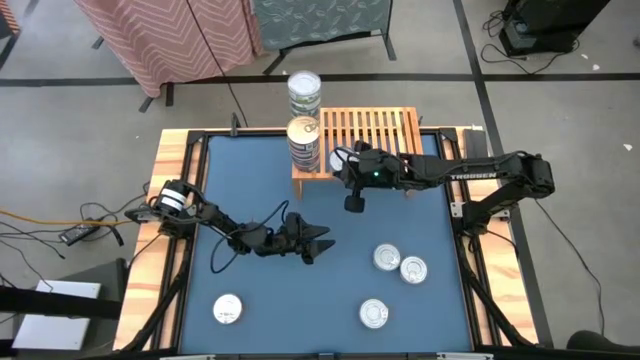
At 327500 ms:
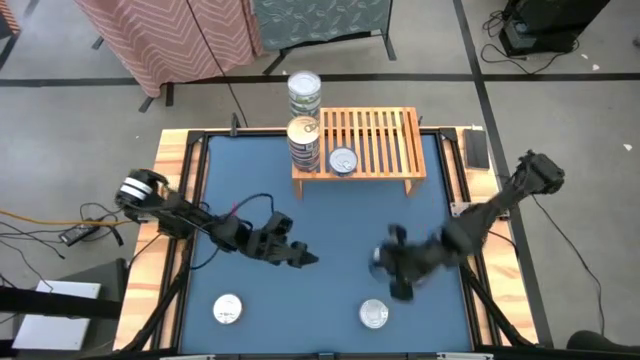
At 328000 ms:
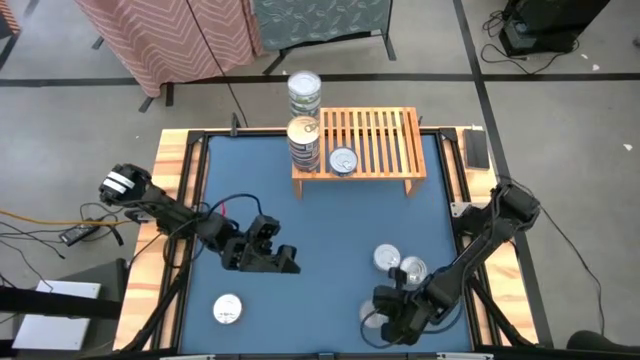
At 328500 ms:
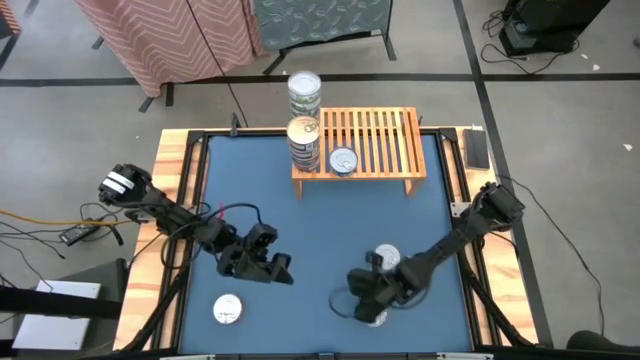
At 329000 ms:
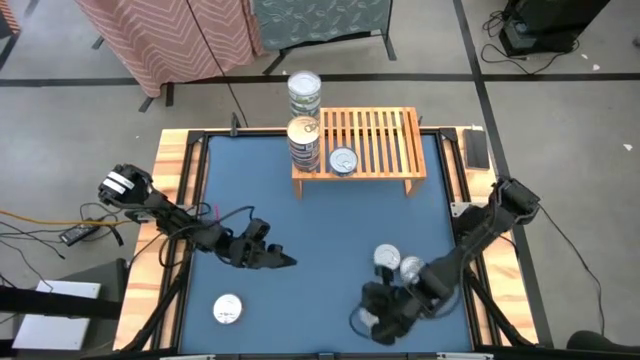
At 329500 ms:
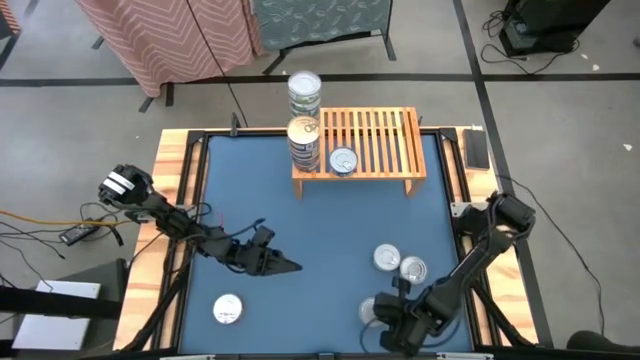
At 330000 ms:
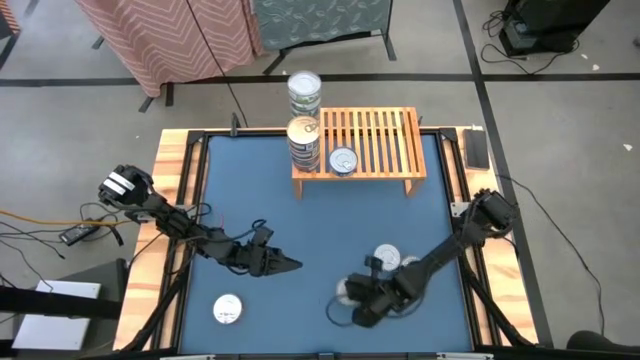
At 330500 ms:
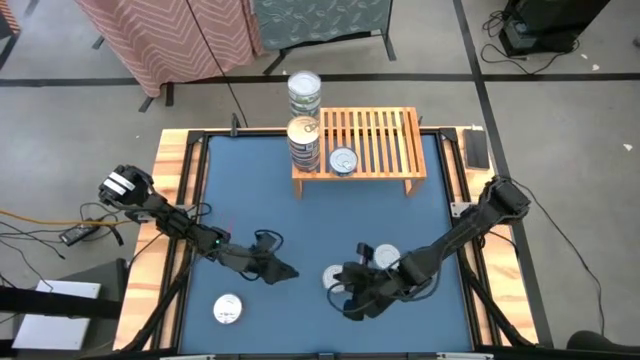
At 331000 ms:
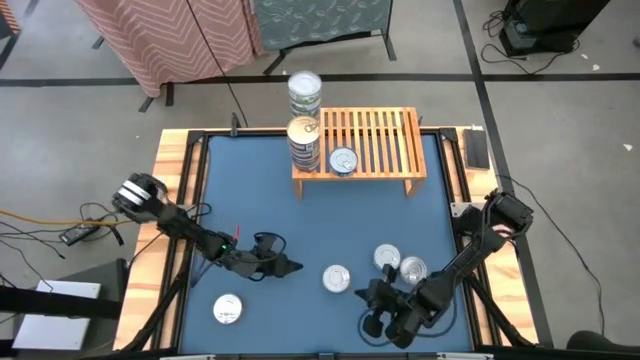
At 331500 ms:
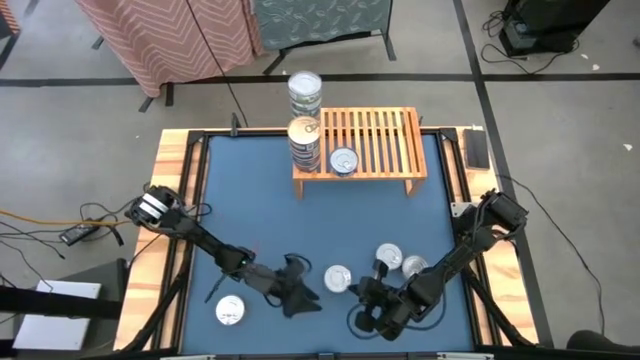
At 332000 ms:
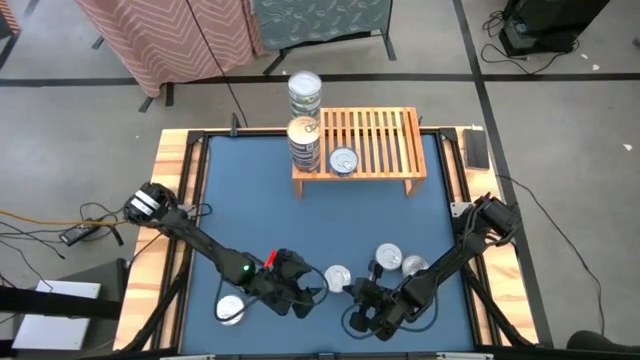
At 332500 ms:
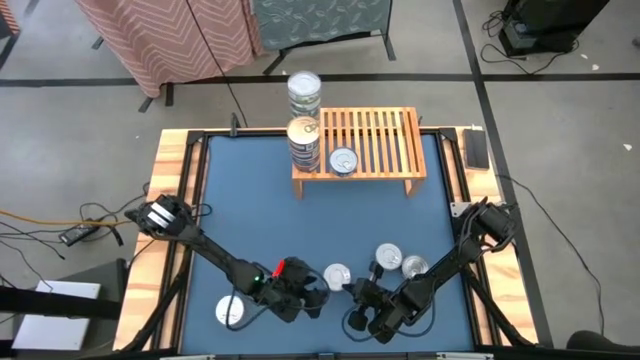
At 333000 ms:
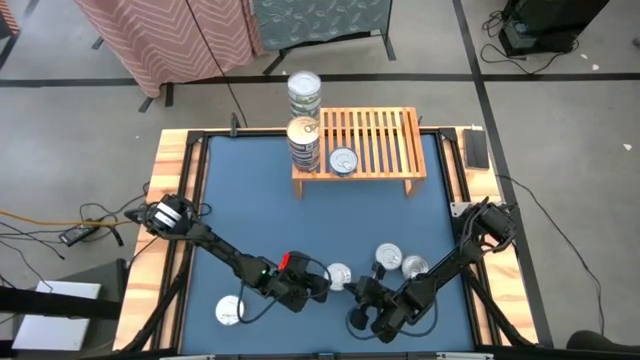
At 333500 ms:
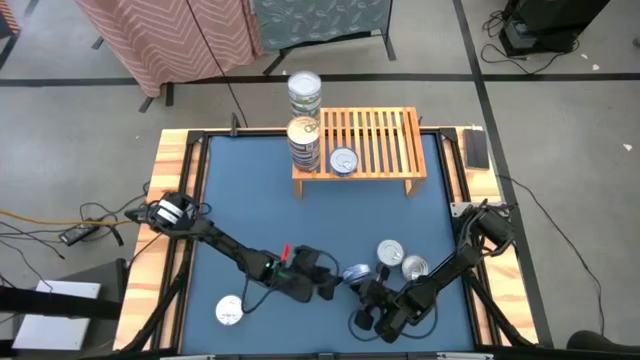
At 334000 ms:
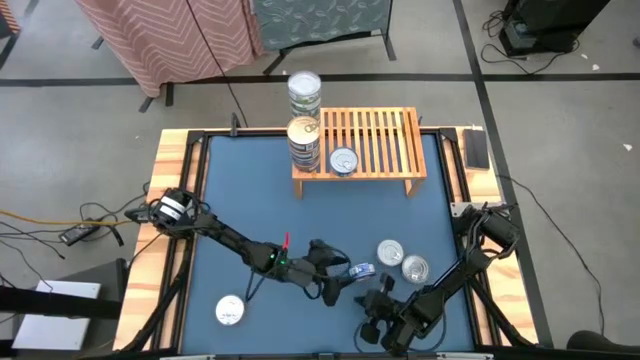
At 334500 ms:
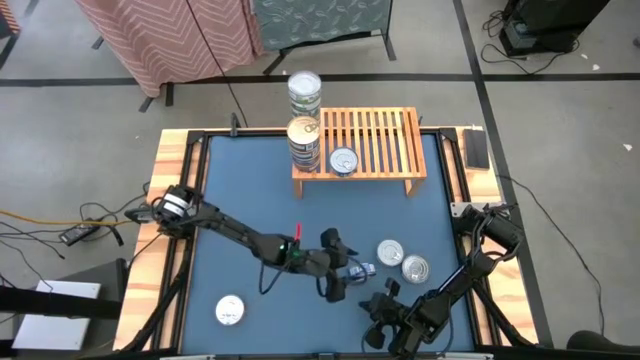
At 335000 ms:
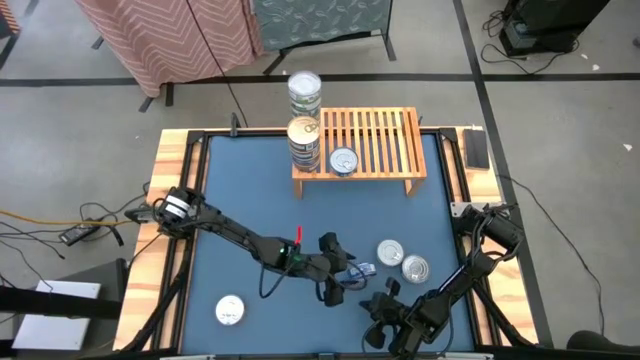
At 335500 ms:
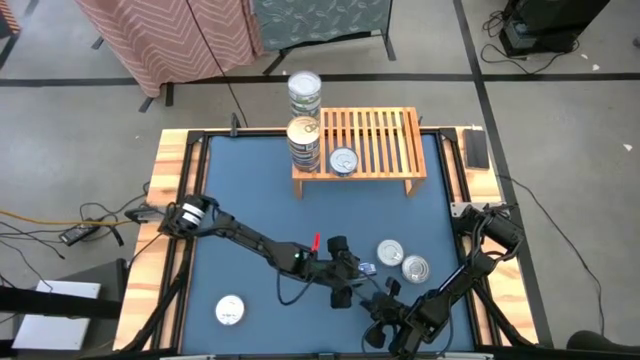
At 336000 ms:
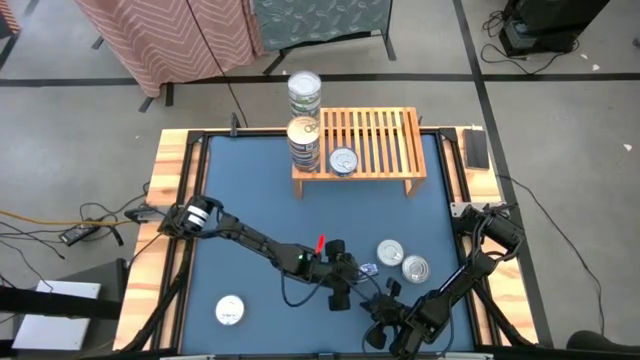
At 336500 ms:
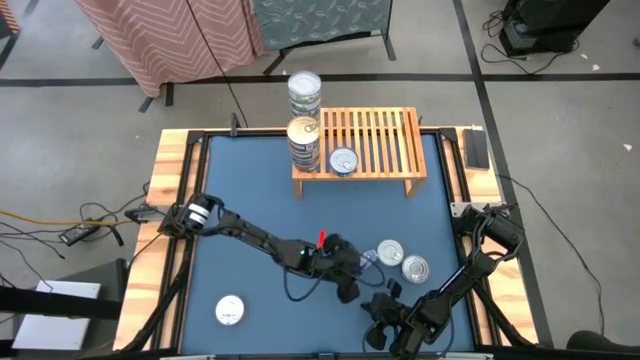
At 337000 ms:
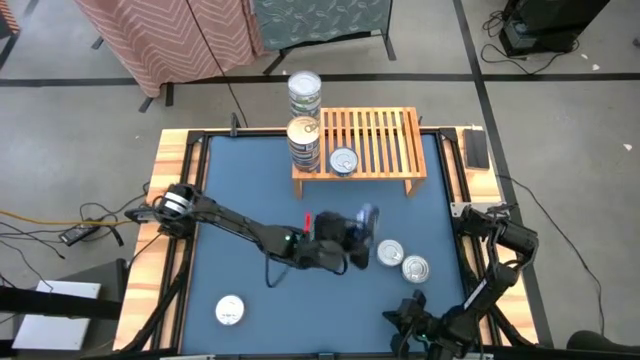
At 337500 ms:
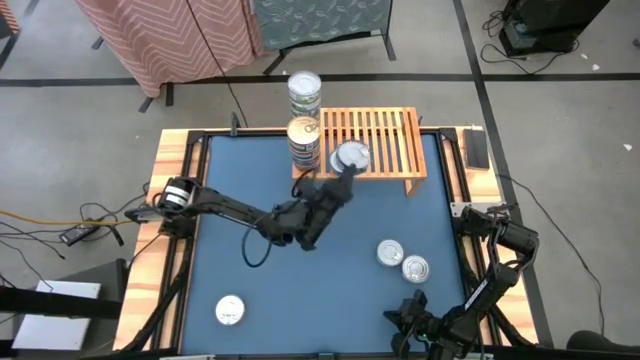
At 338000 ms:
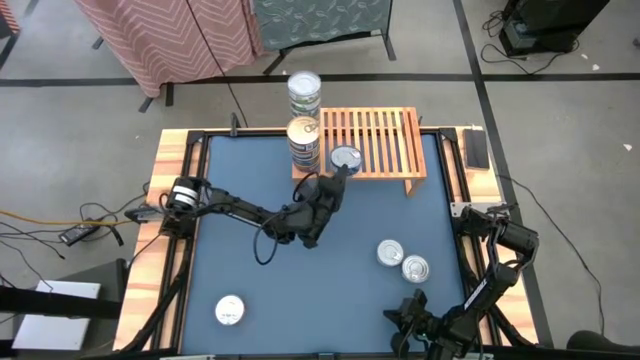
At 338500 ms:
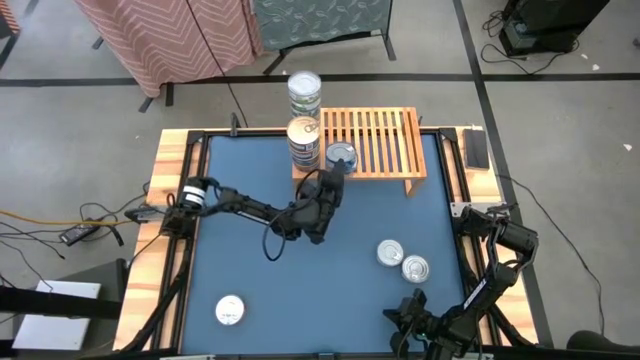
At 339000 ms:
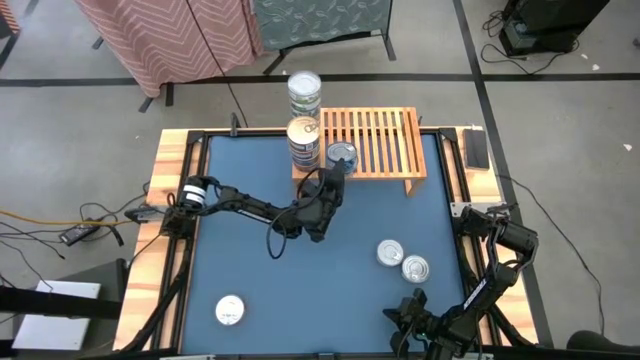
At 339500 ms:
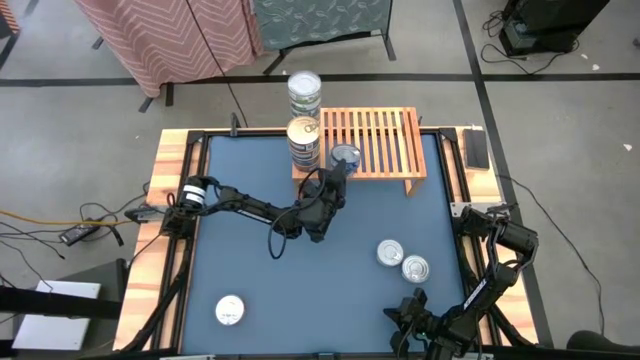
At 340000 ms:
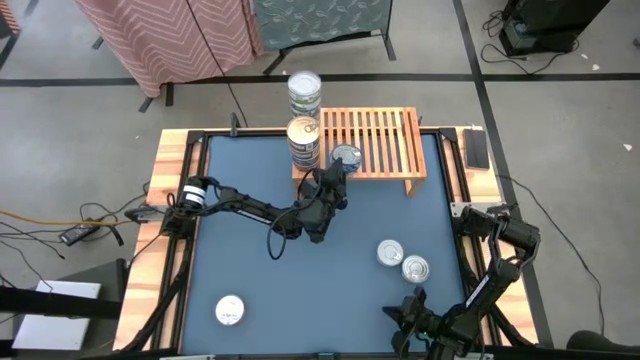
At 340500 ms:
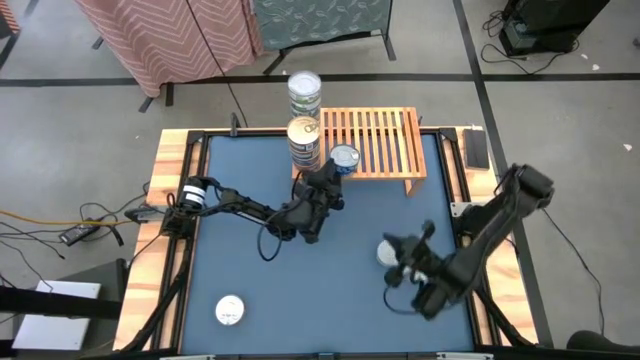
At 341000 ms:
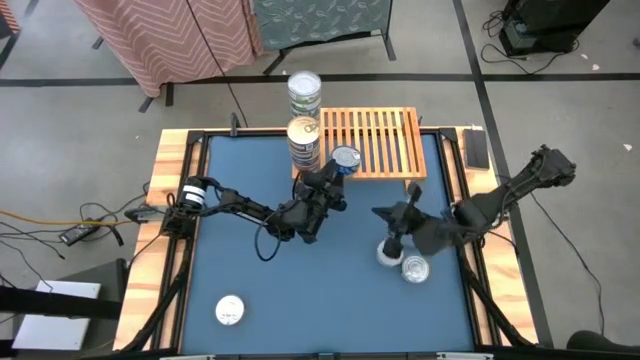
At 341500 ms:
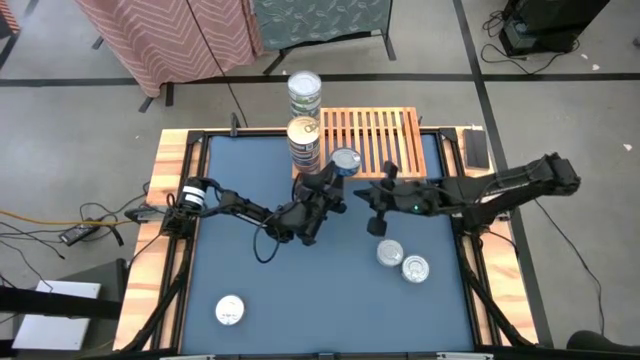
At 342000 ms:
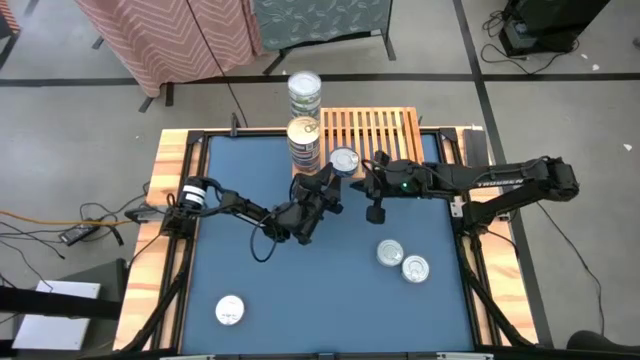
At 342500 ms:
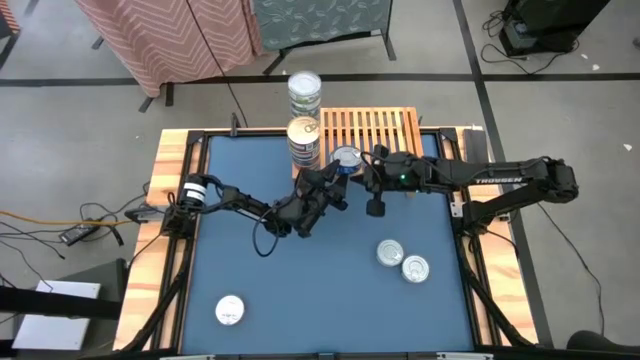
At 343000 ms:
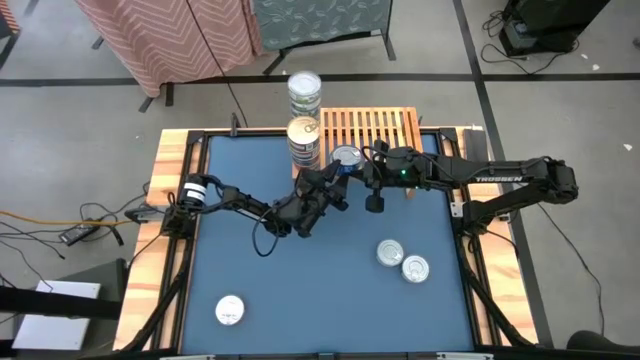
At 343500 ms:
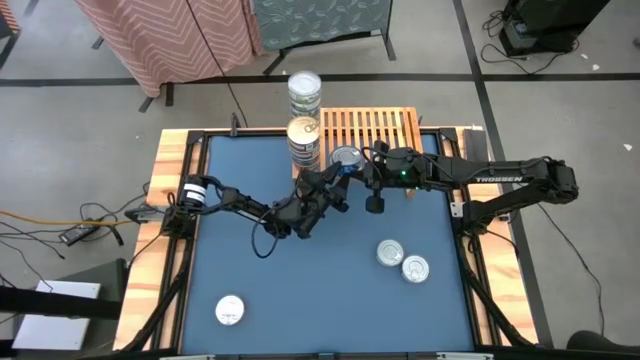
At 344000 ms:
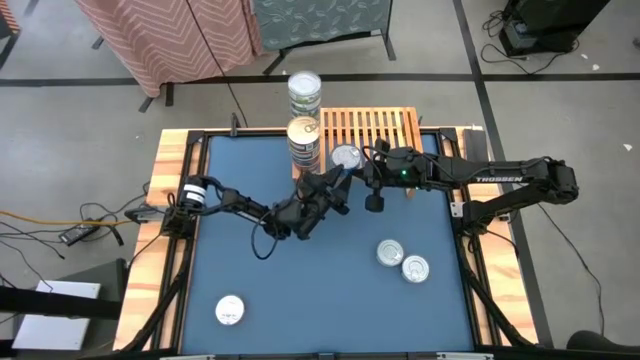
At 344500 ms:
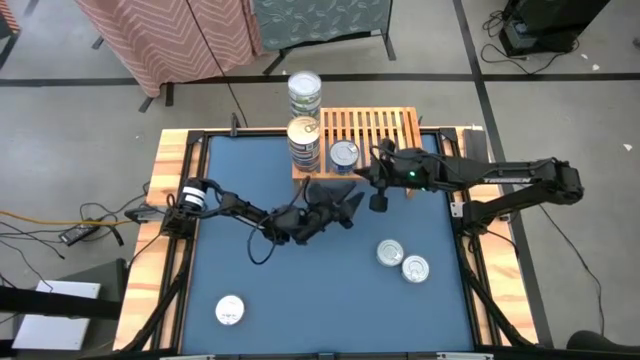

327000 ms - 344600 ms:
Task: Stack canned seafood by type on shelf
Stack the dark blue tuna can on top of the dark blue tuna can on the shelf

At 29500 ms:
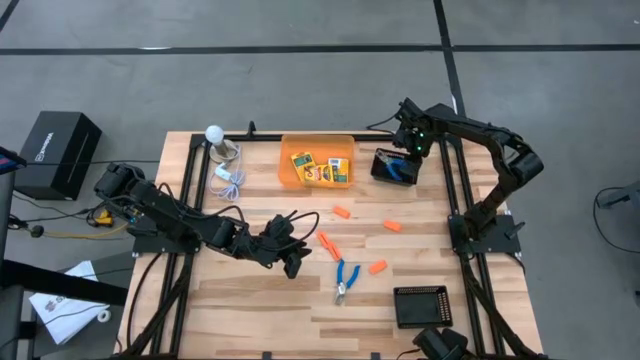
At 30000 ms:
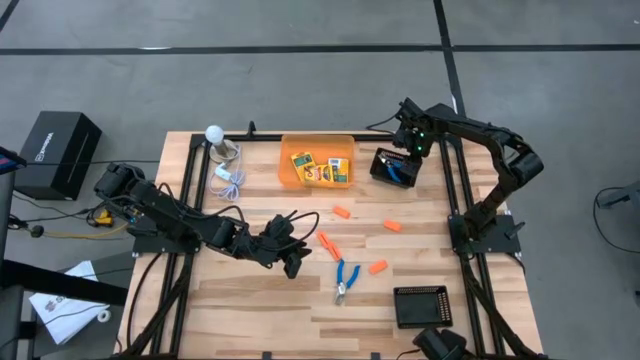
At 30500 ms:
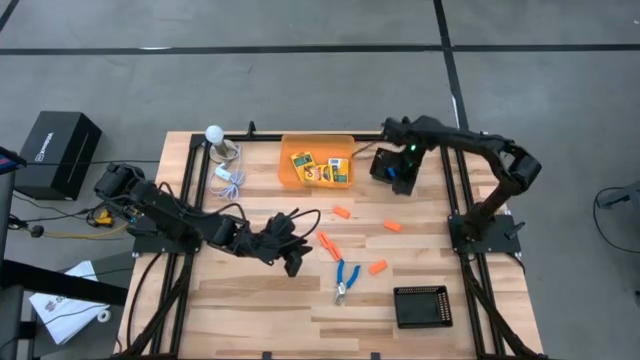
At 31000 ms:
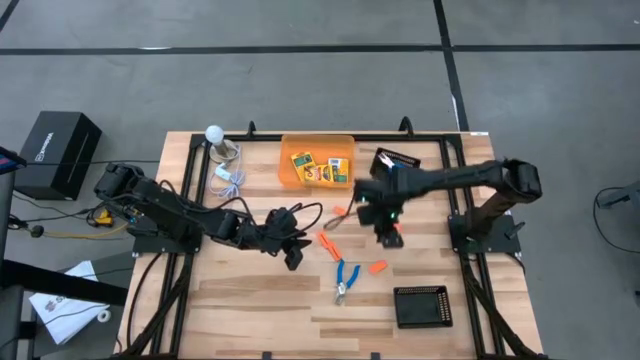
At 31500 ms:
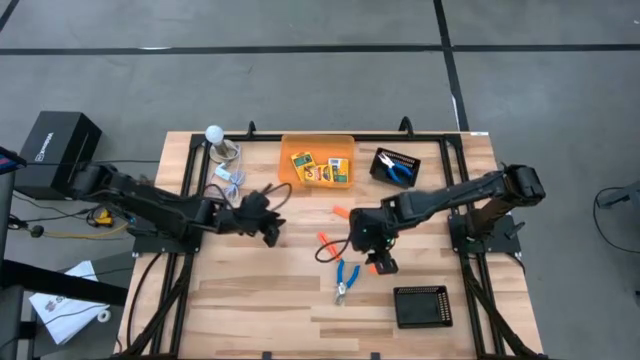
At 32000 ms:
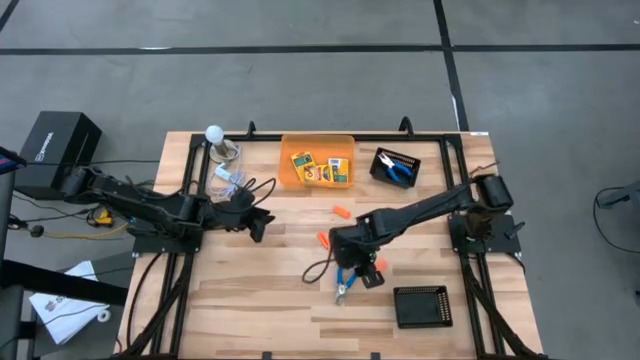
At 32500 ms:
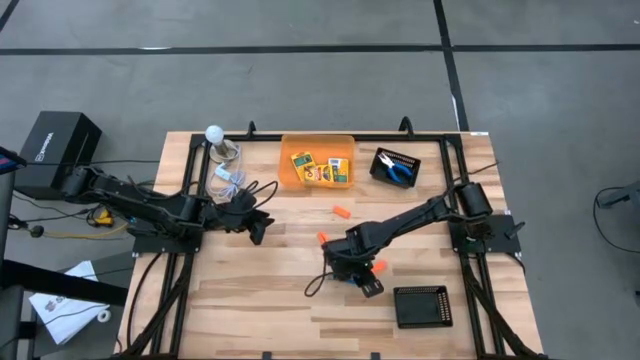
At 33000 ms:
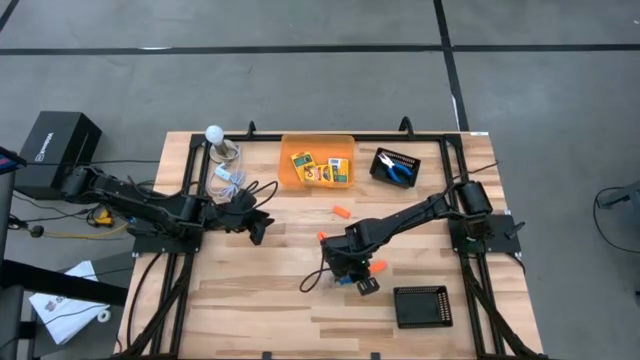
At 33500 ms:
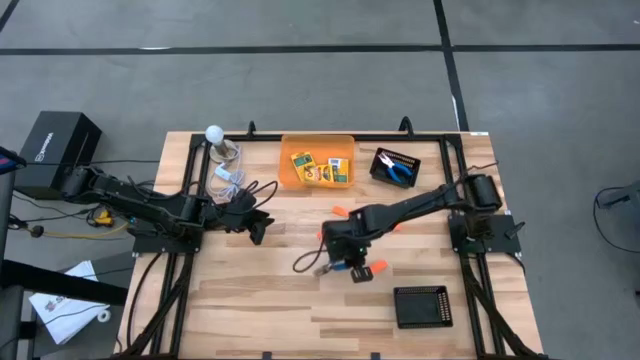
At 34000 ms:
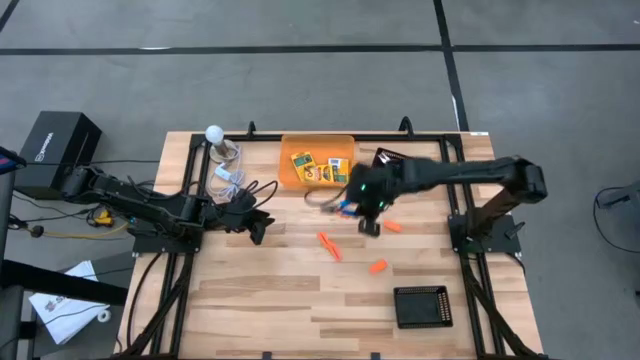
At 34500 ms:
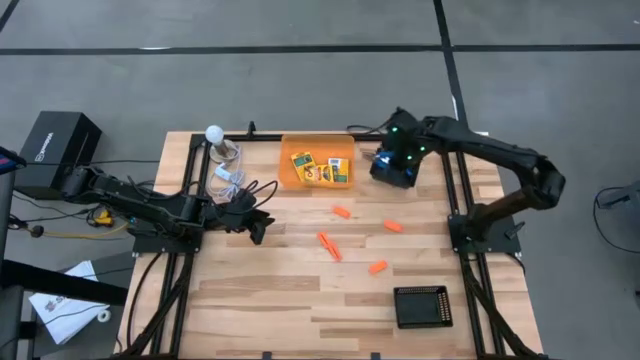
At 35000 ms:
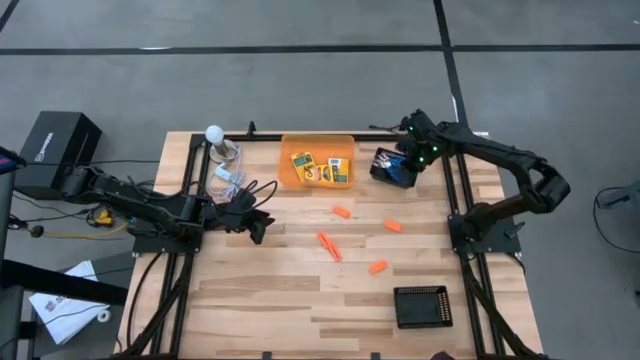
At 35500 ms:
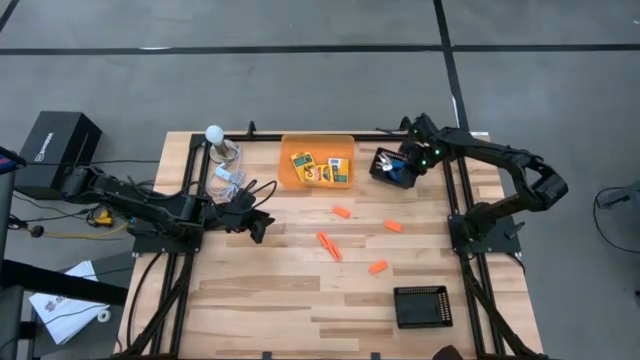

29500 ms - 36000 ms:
Task: Pick & Place School Supplies
Put the blue hole punch into the top black bin
